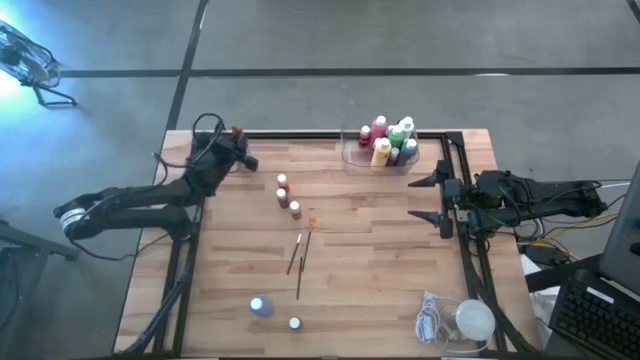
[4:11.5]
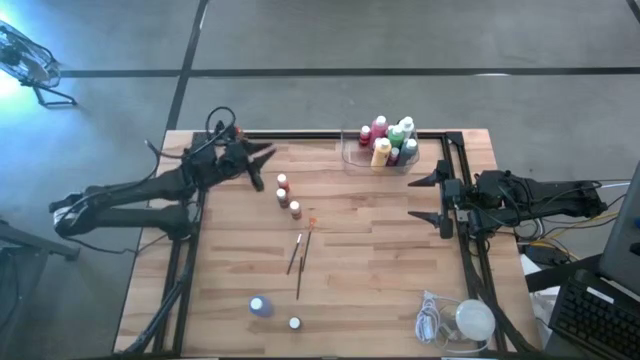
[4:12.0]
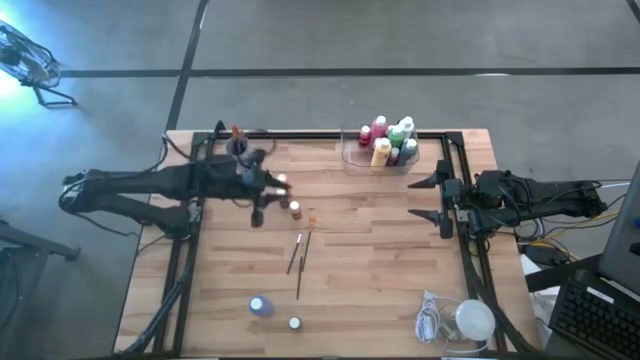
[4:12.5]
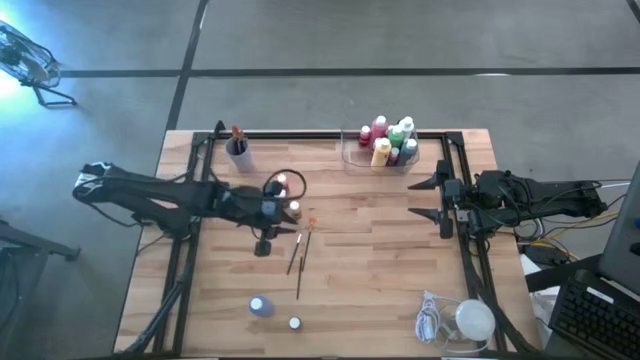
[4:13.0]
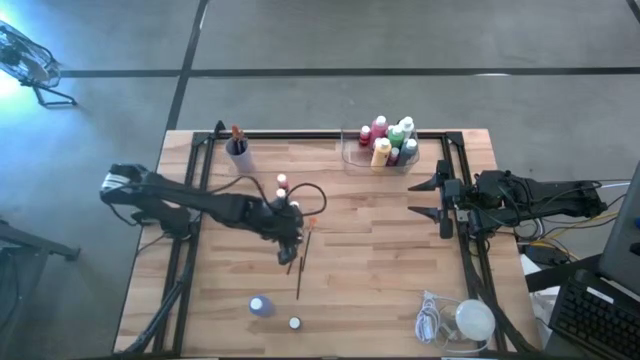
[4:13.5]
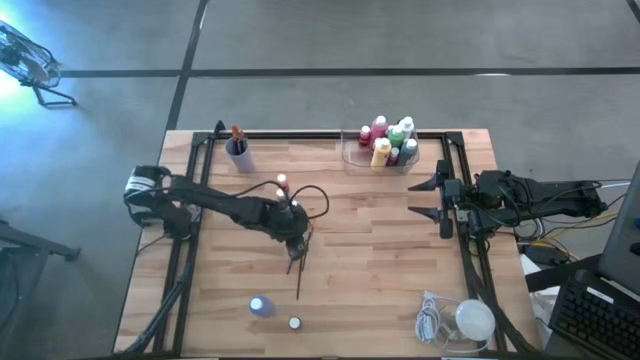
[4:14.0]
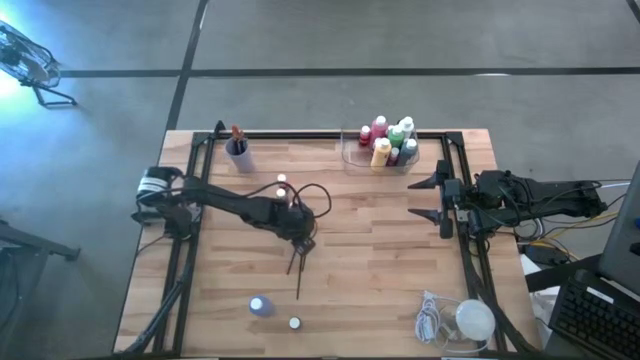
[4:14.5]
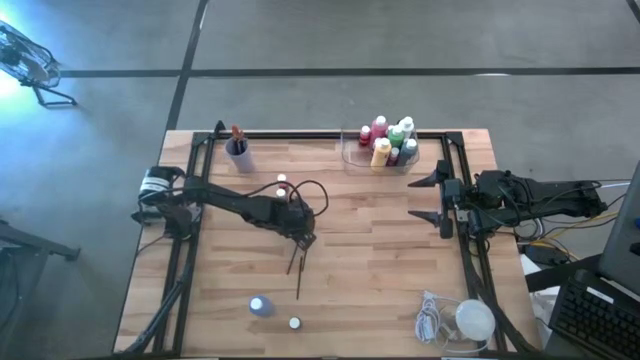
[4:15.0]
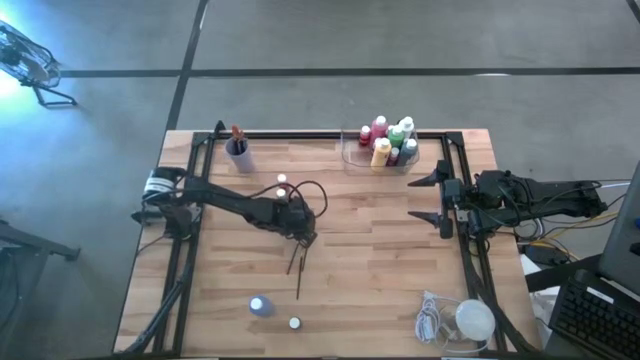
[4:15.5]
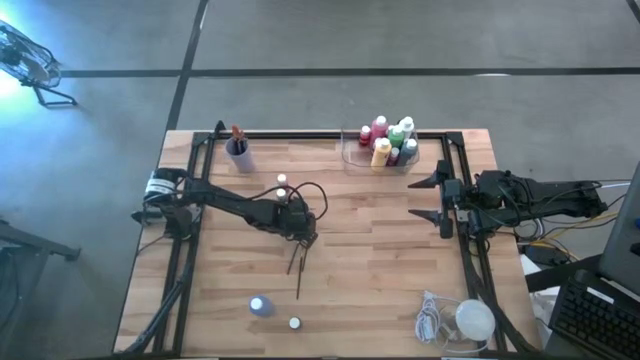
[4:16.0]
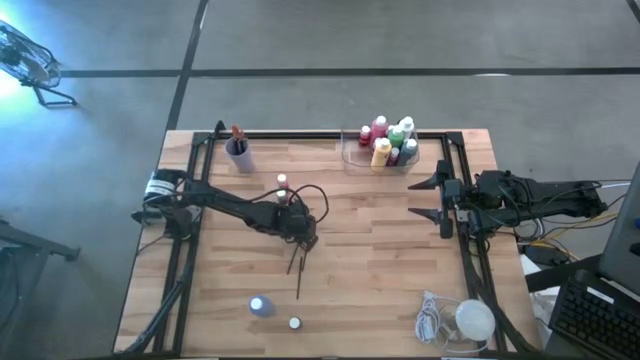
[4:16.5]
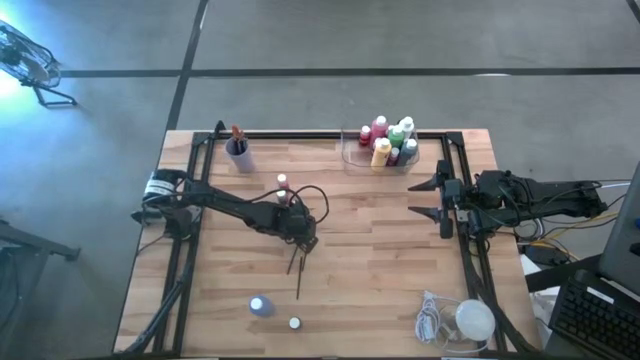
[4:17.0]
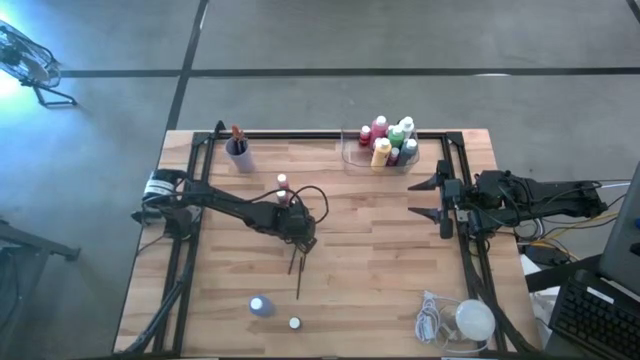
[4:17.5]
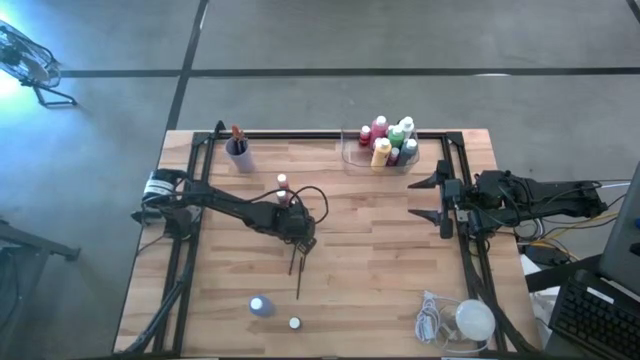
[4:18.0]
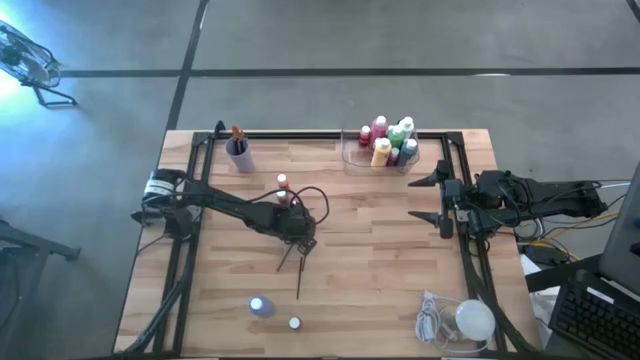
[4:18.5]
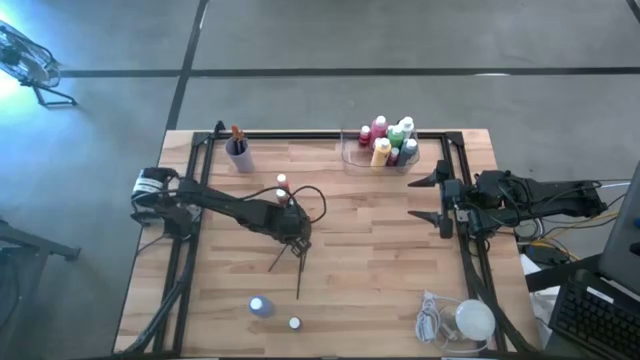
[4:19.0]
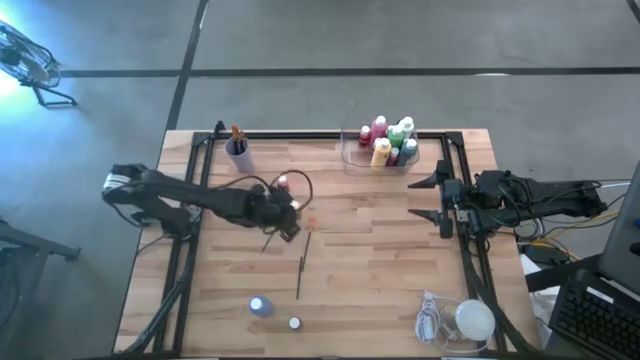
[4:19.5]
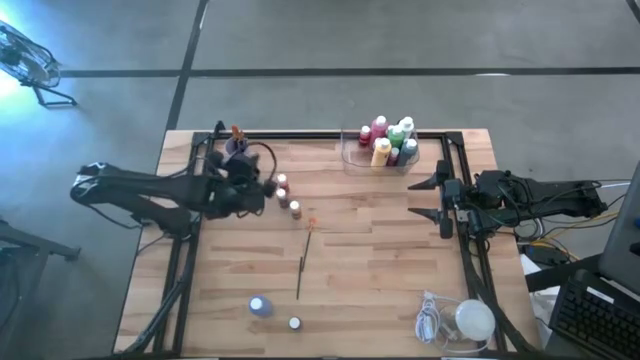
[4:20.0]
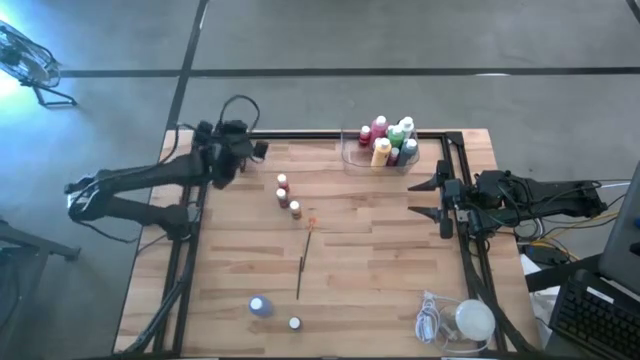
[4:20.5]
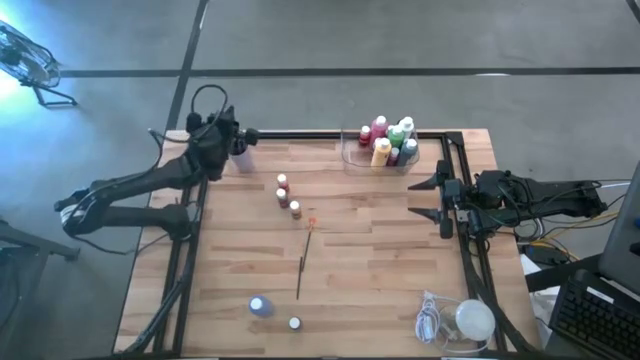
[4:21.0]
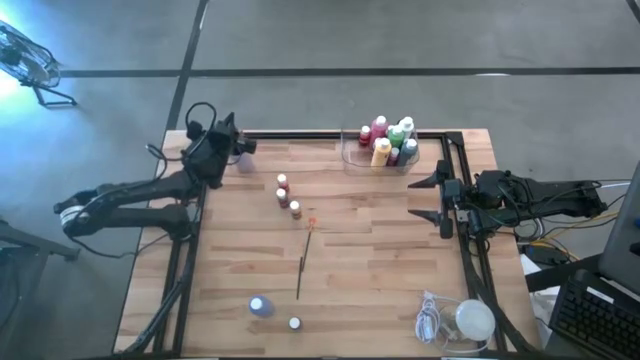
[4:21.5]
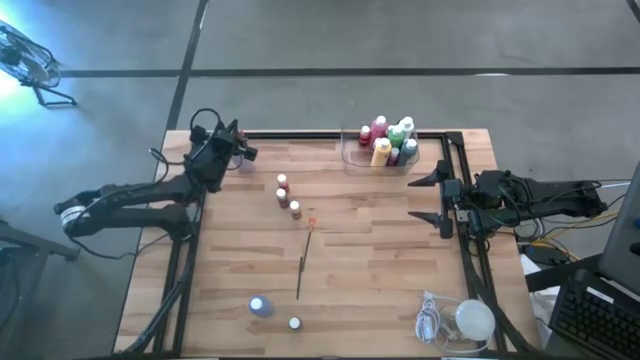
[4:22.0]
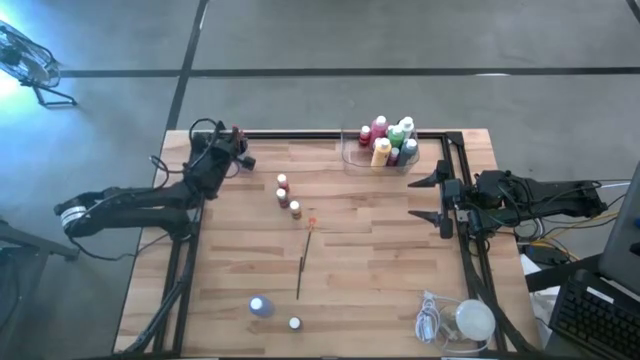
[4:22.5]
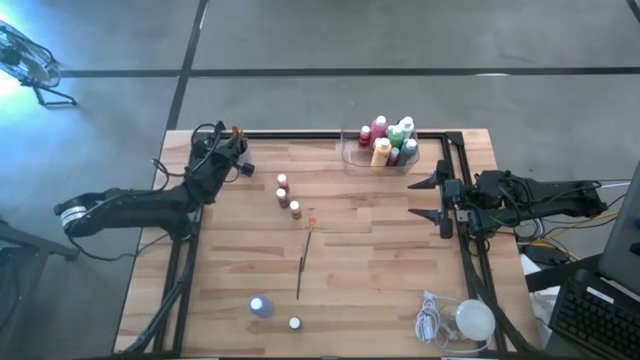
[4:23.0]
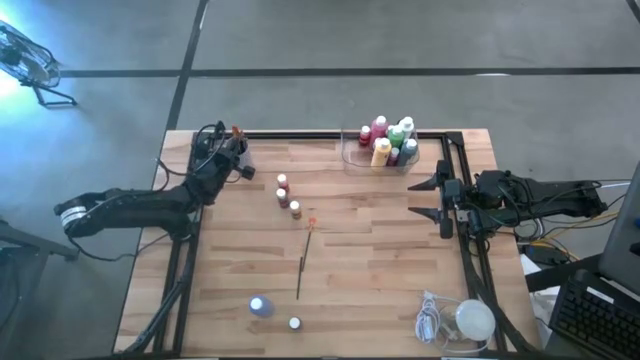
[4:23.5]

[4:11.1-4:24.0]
Task: Pick & Place Paint Supplies
Put the silver paint brush into the violet cup

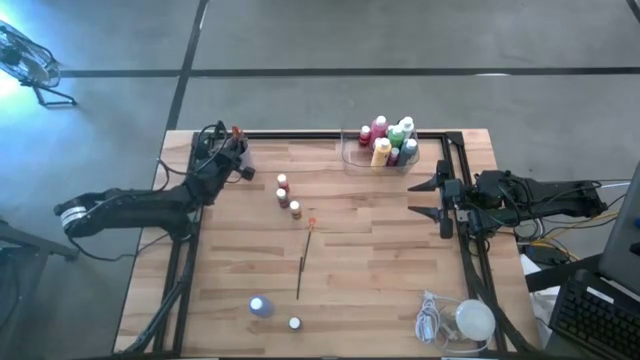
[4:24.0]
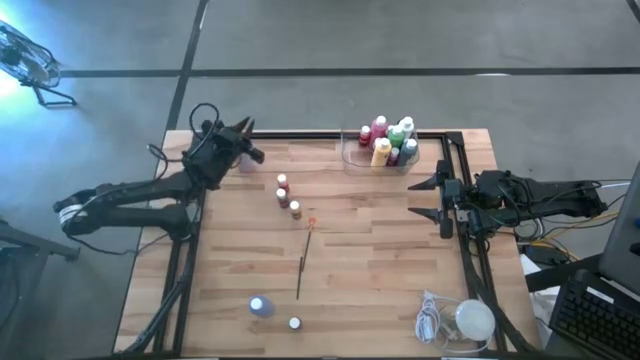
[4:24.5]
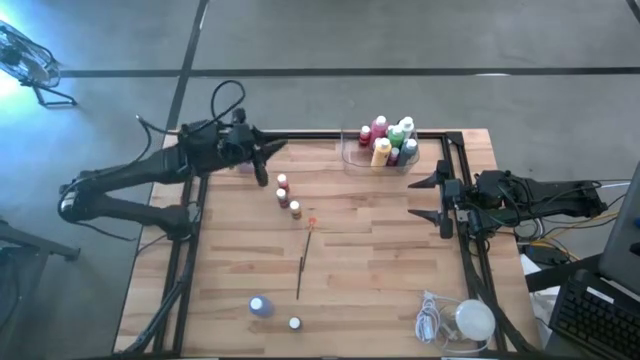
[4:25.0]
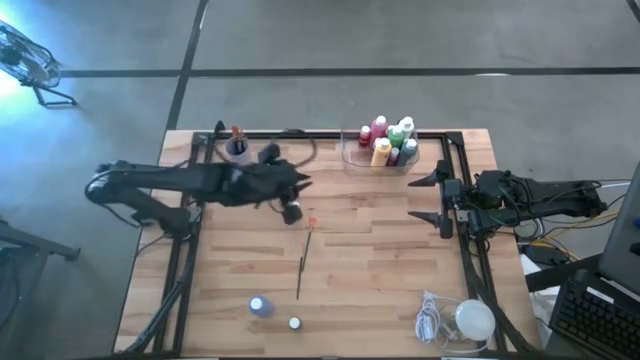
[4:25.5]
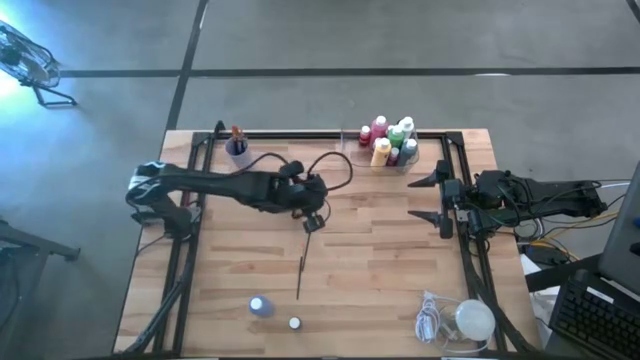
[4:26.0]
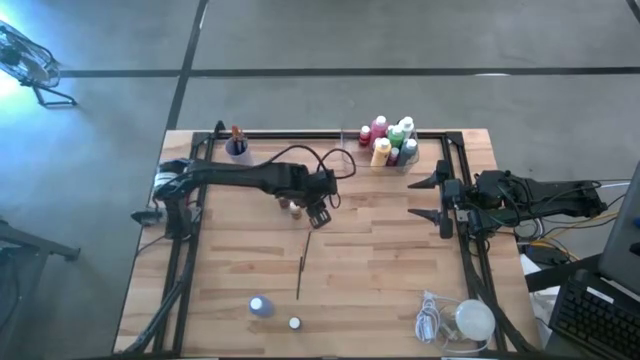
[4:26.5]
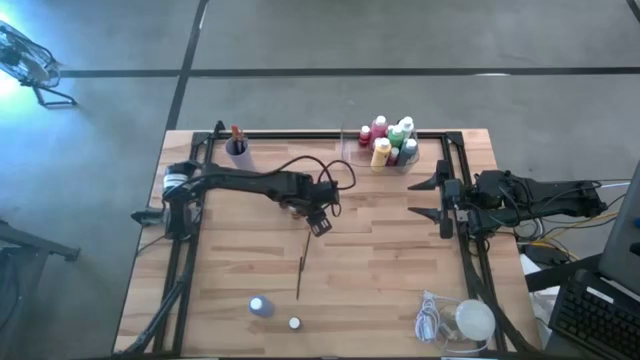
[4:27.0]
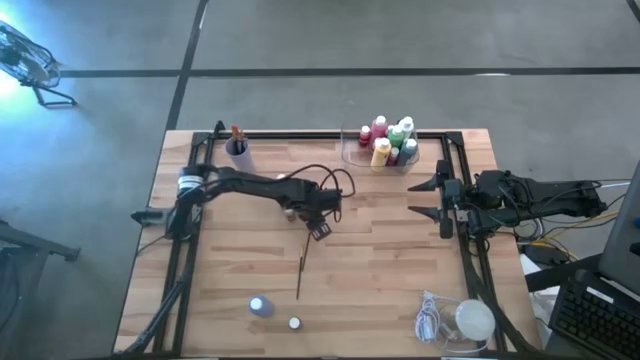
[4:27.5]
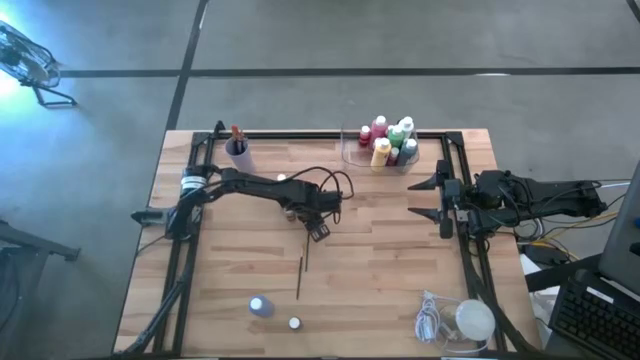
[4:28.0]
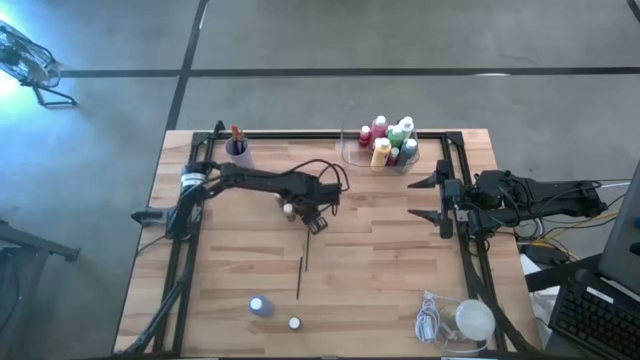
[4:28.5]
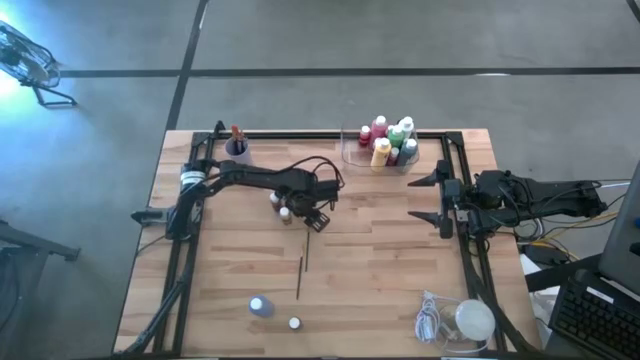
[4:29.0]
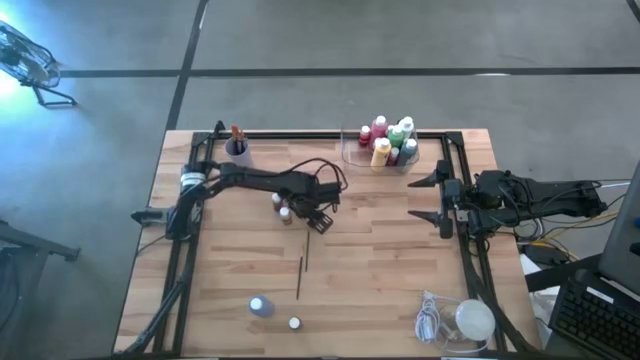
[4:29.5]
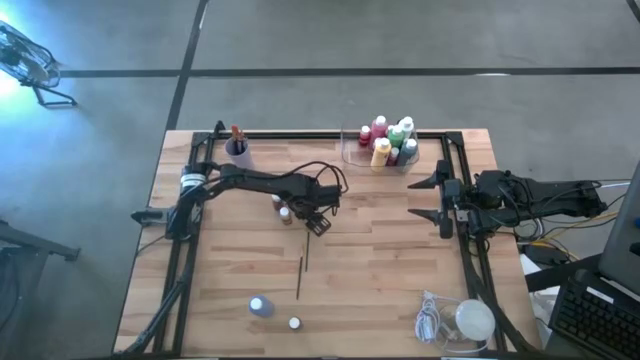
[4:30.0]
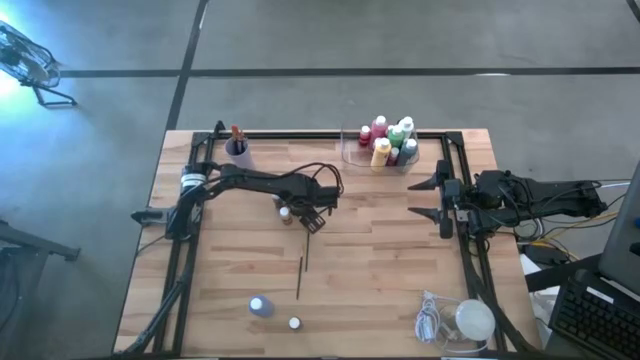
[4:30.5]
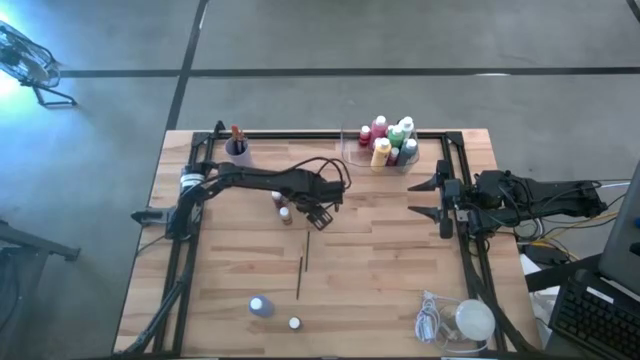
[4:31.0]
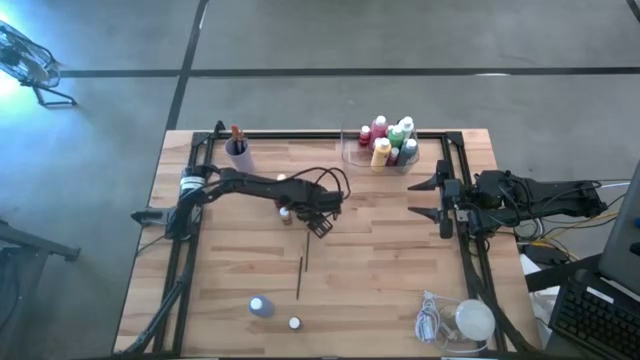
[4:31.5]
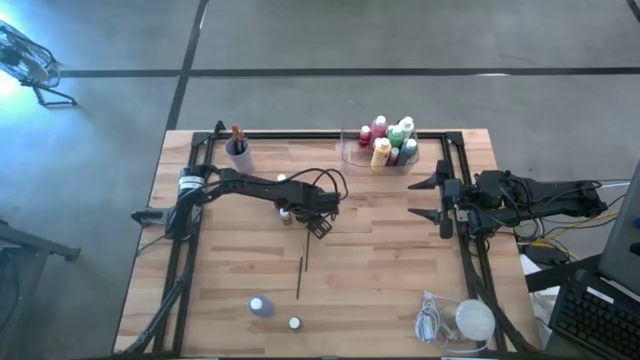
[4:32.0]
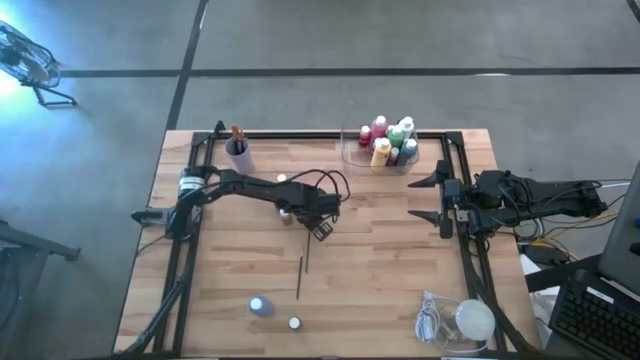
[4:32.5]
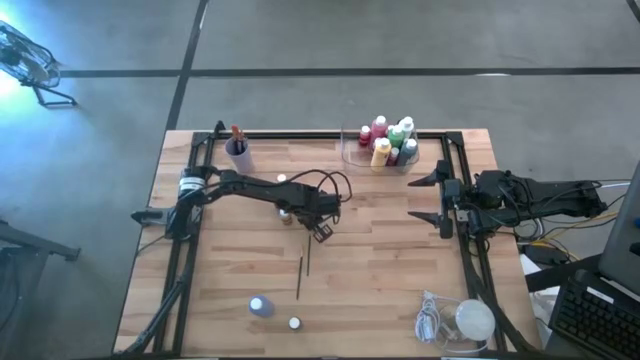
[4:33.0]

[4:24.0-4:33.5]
Put the gold paint brush into the violet cup
